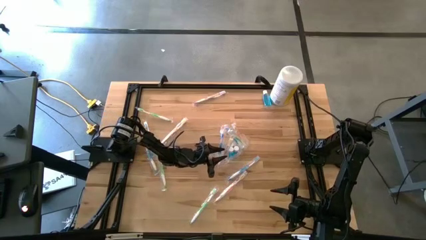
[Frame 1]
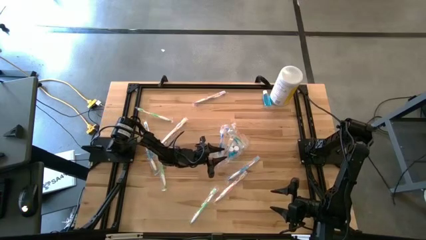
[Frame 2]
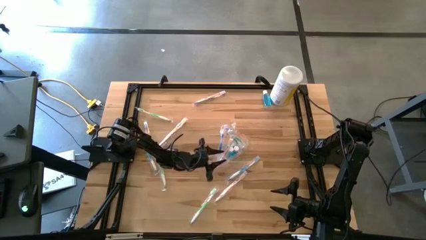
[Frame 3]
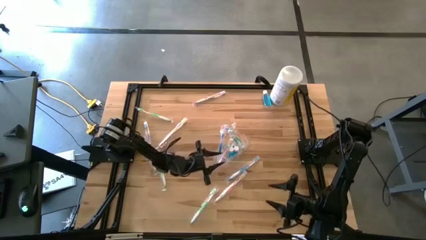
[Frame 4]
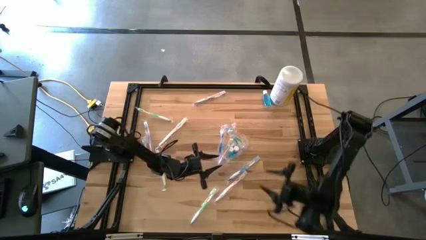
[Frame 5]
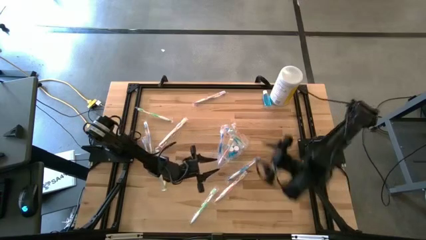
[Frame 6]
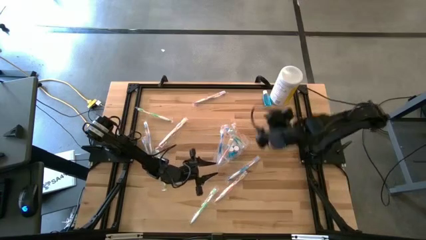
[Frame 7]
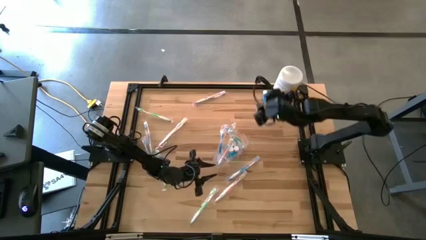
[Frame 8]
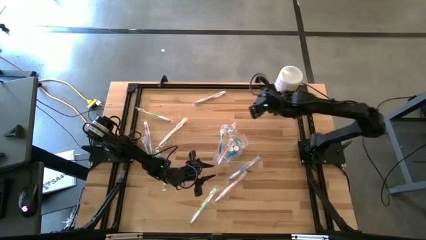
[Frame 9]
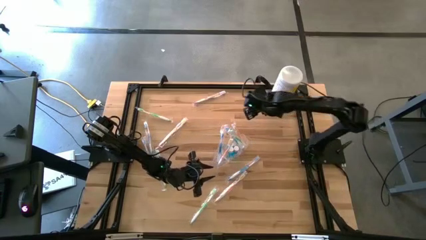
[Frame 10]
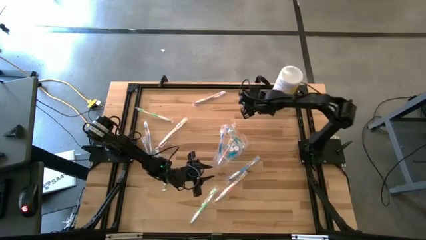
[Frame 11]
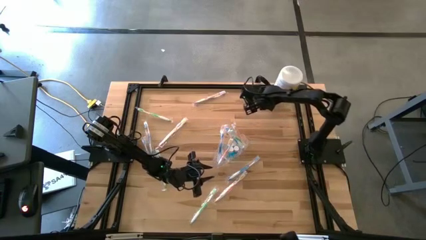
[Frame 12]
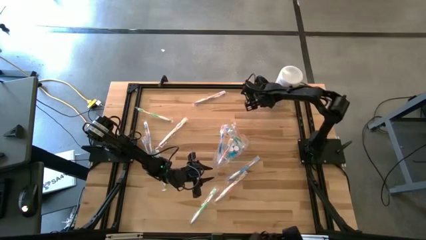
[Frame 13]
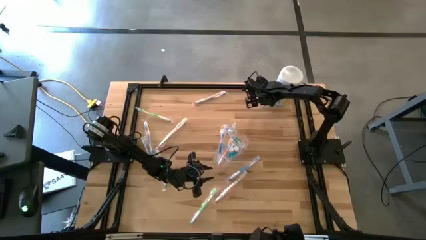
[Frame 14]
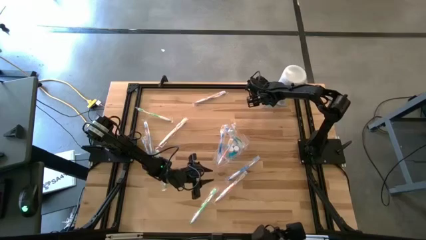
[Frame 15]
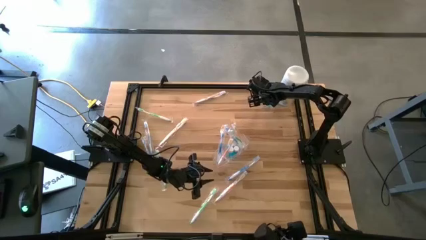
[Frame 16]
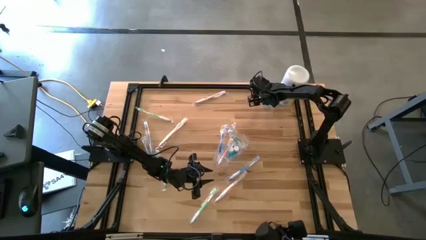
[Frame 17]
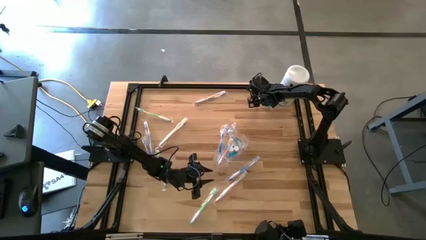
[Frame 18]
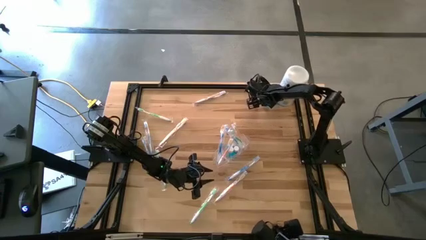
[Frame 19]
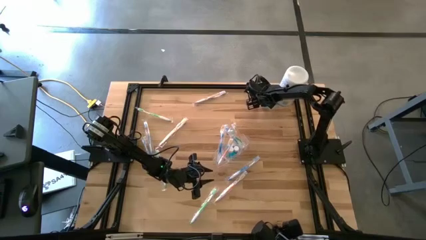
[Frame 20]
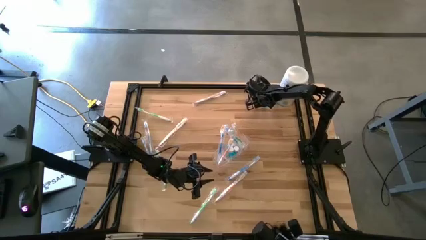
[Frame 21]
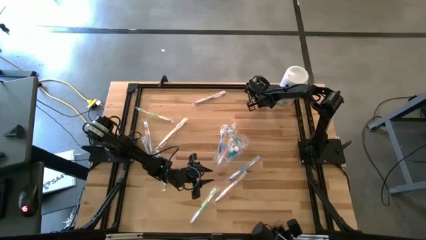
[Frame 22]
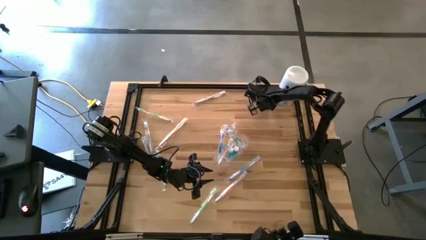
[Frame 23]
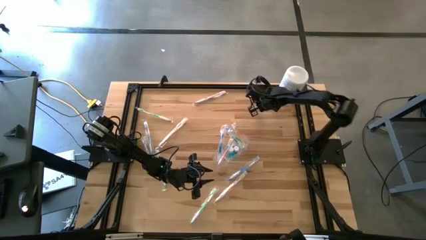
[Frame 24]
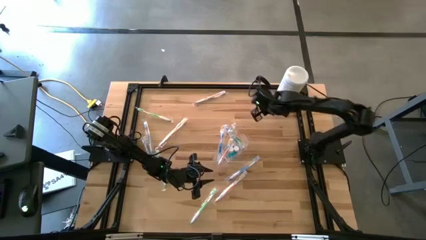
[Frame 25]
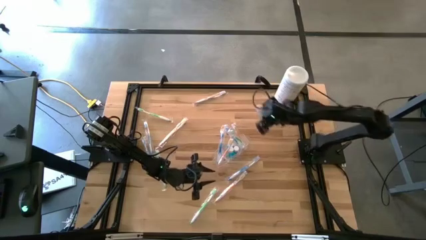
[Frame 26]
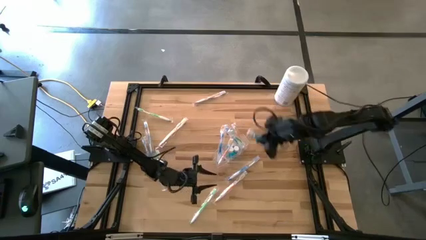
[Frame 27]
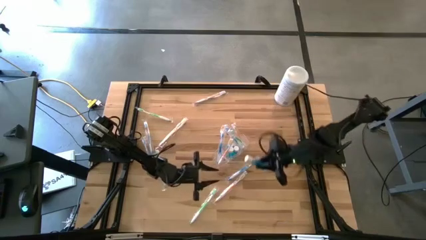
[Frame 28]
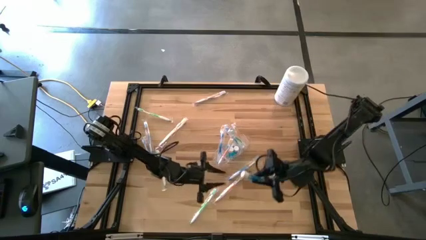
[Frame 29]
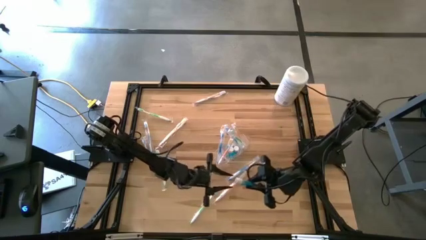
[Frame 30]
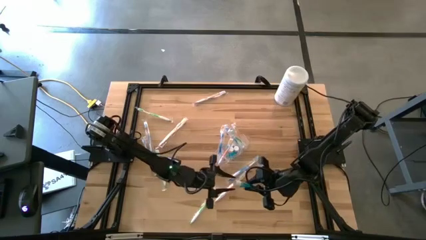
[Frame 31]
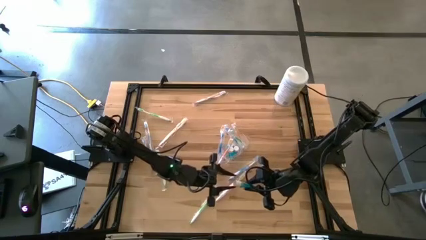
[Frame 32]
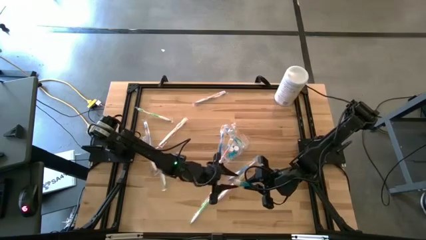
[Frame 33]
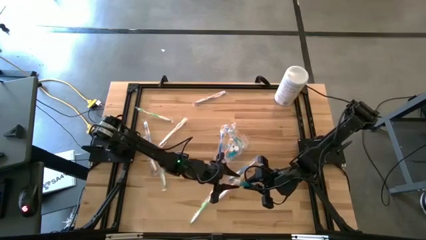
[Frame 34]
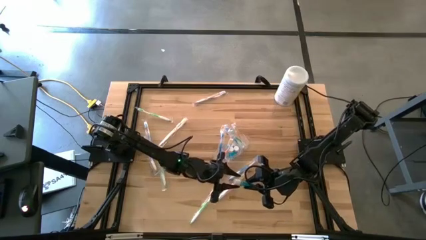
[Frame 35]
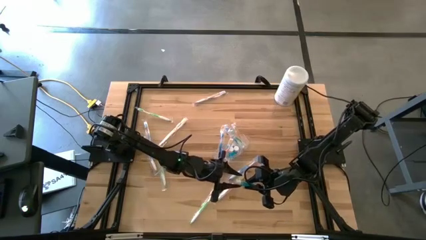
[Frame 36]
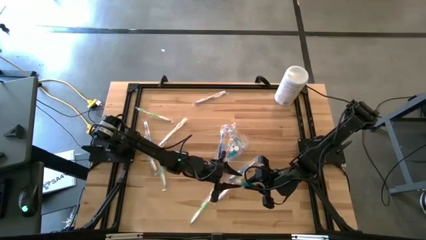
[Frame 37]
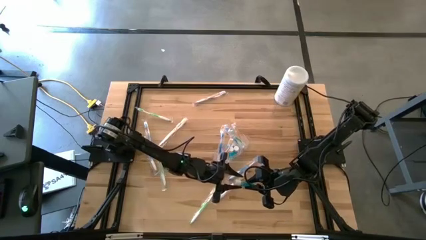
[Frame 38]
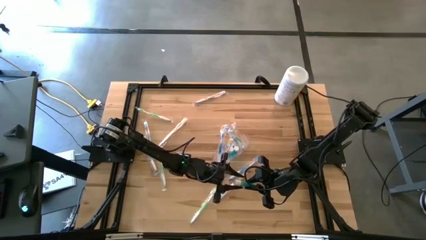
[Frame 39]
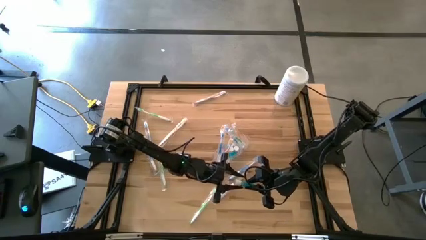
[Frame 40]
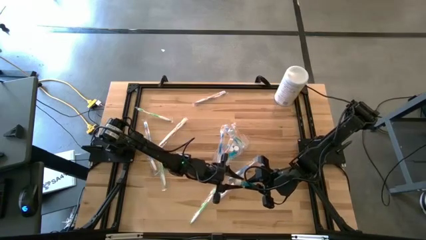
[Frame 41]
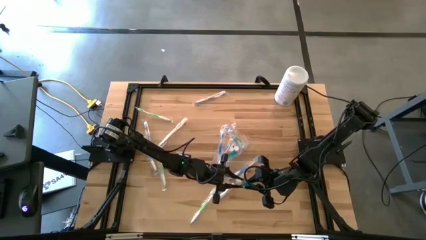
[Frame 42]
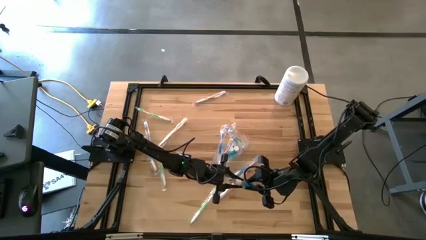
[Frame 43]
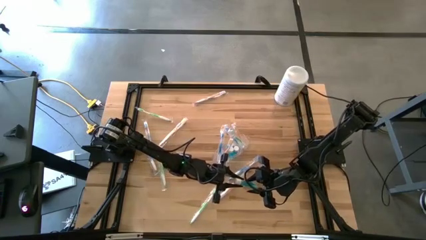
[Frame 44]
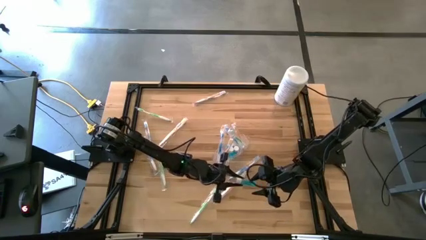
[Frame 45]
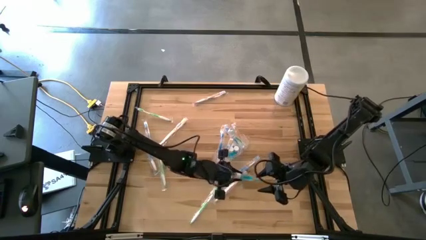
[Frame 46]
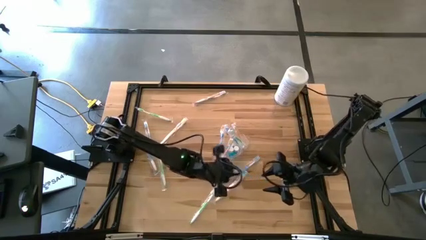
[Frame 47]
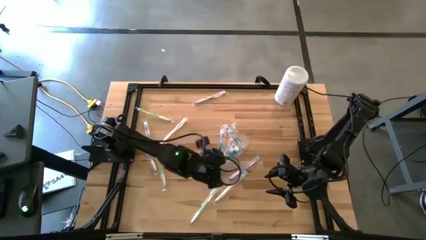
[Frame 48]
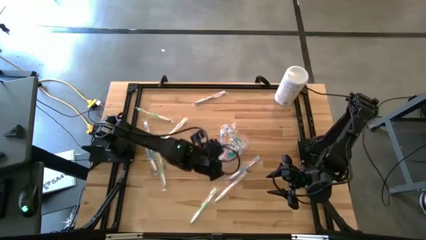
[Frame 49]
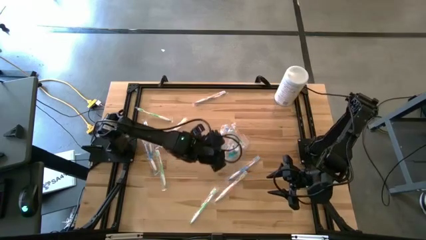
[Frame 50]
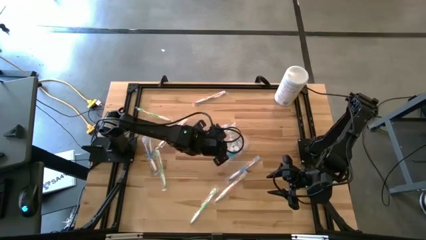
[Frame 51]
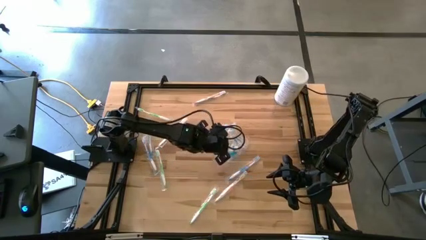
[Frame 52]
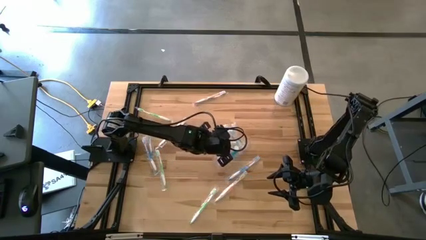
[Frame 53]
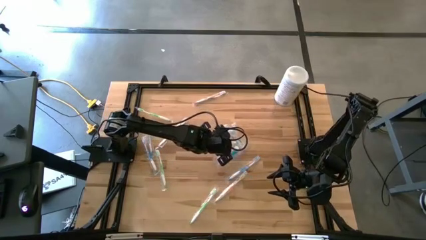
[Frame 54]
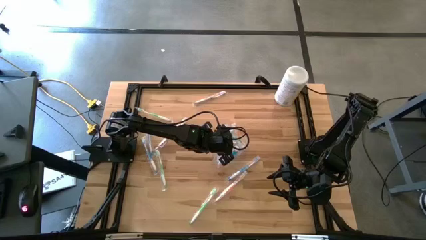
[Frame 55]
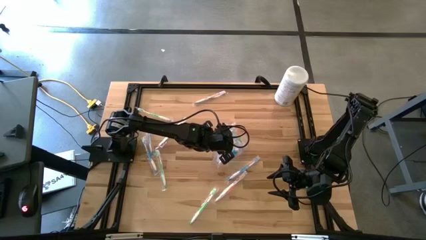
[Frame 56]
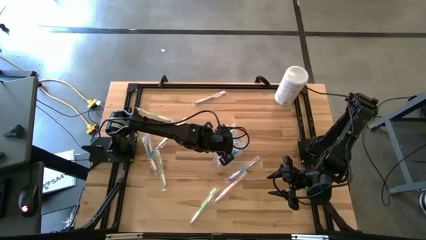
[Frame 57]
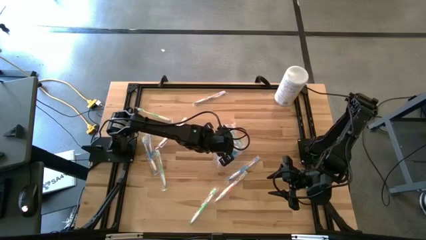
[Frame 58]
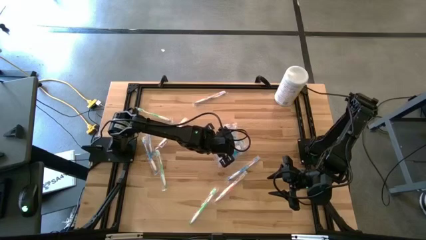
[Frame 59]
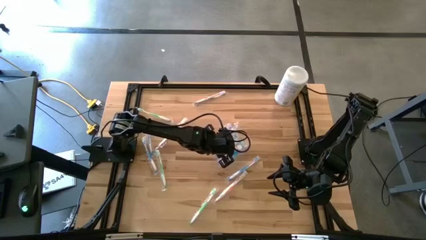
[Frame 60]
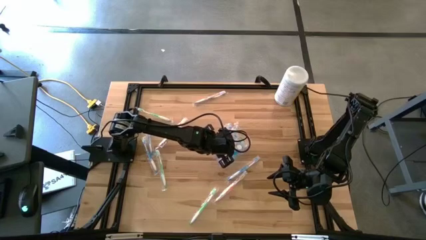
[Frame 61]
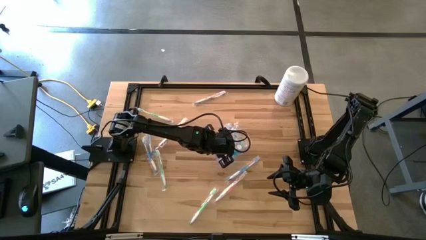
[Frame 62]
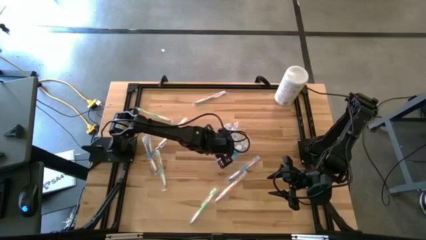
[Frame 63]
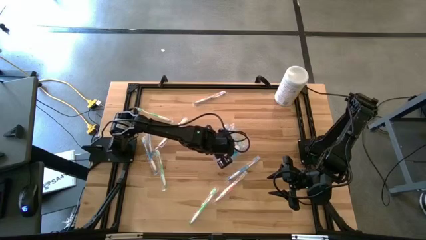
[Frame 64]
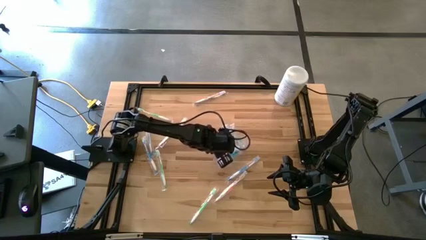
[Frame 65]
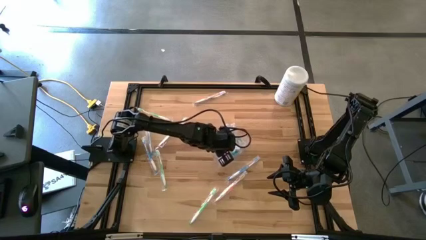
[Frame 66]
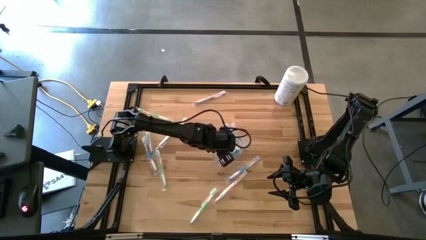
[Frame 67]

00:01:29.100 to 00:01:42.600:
Task: Pick & Place toothbrushing station
Put the blue mouthwash into the transparent organizer
